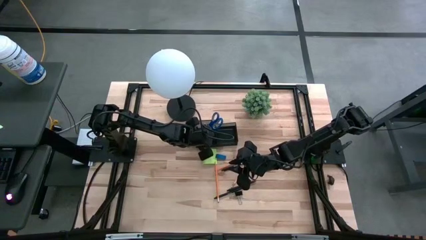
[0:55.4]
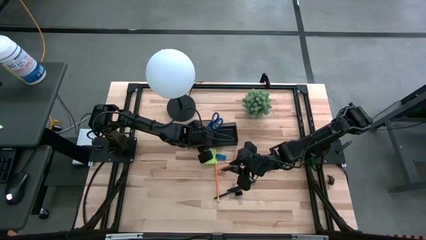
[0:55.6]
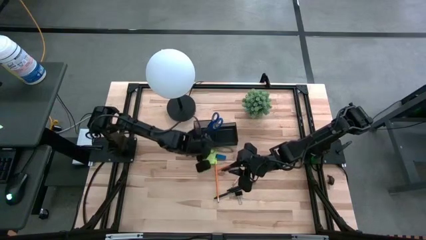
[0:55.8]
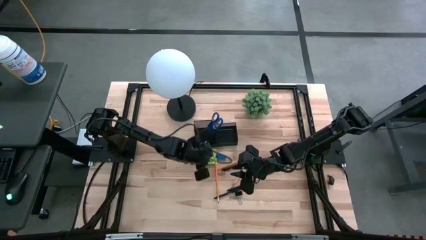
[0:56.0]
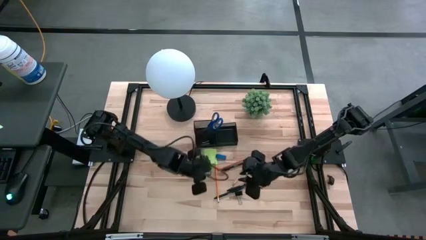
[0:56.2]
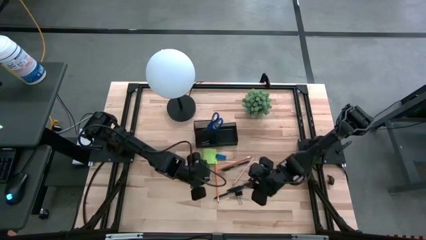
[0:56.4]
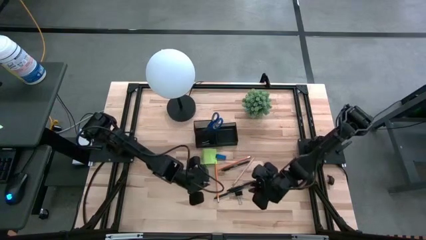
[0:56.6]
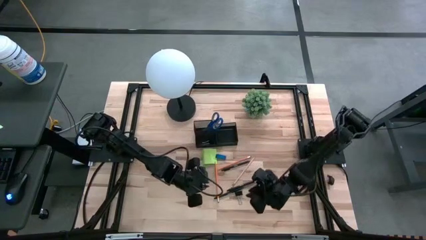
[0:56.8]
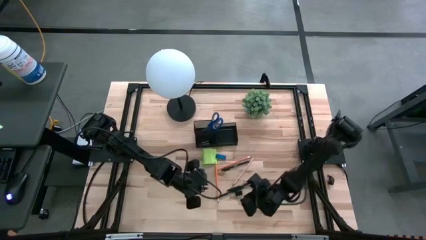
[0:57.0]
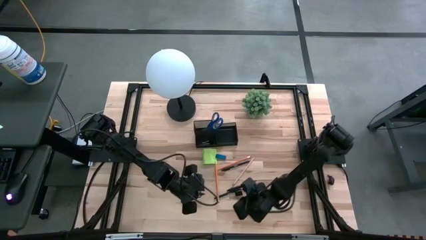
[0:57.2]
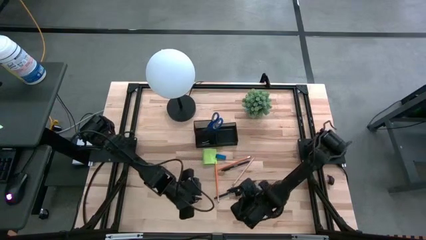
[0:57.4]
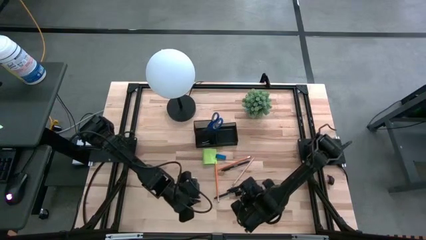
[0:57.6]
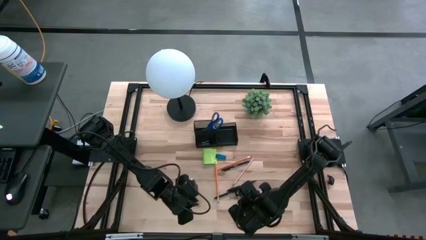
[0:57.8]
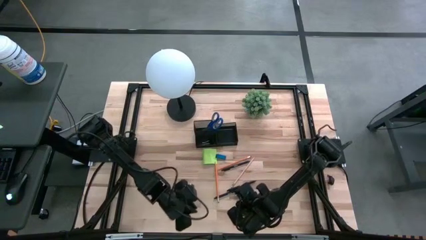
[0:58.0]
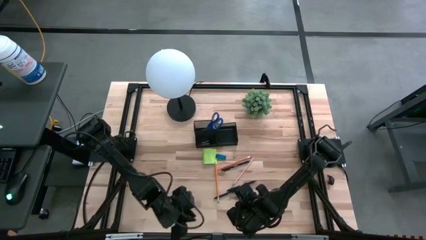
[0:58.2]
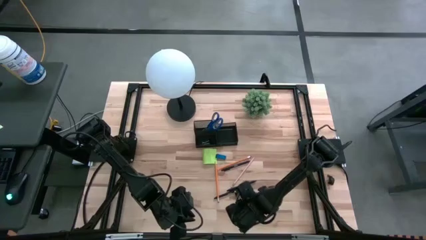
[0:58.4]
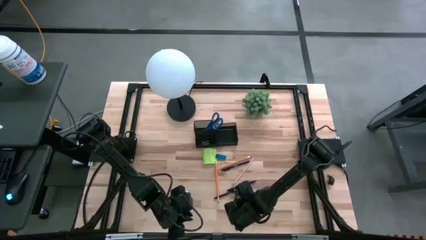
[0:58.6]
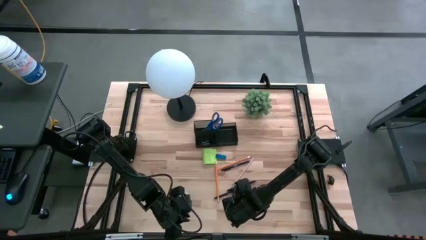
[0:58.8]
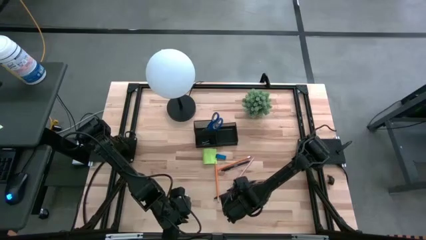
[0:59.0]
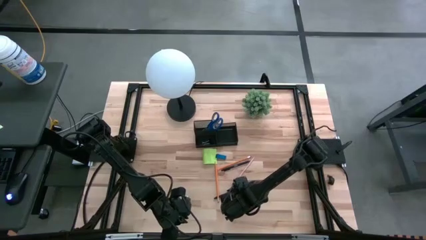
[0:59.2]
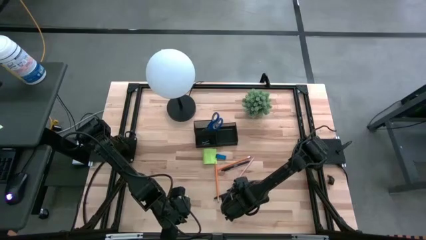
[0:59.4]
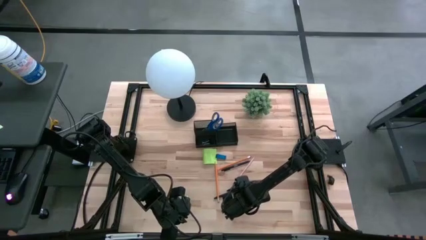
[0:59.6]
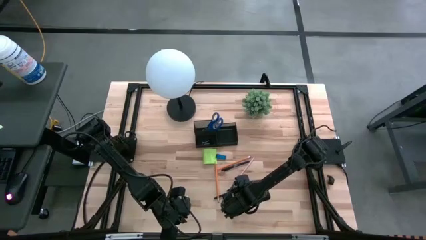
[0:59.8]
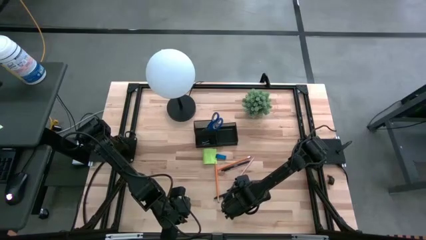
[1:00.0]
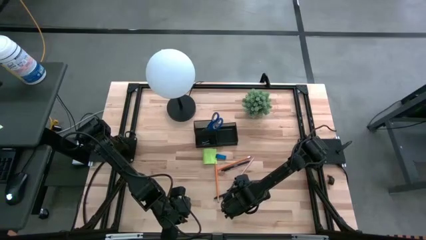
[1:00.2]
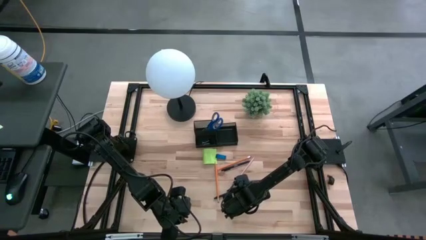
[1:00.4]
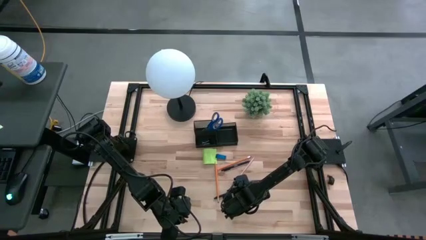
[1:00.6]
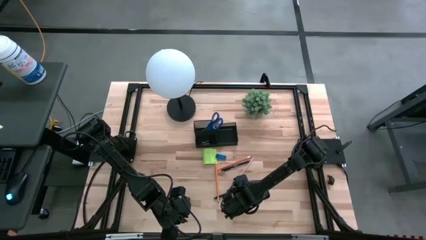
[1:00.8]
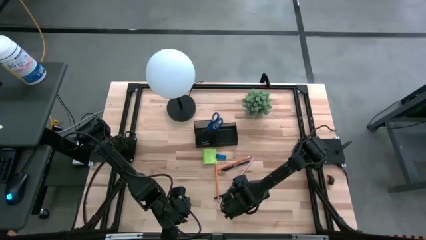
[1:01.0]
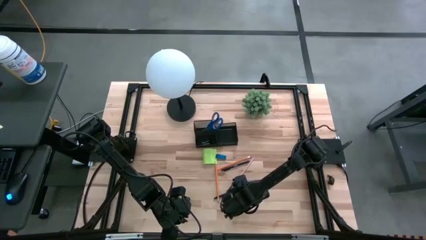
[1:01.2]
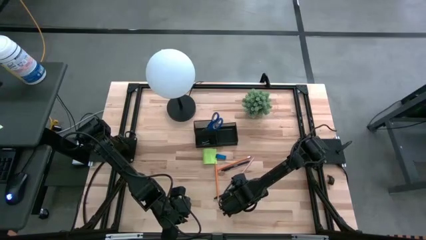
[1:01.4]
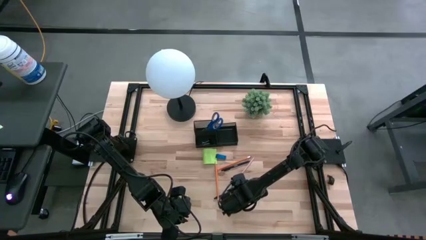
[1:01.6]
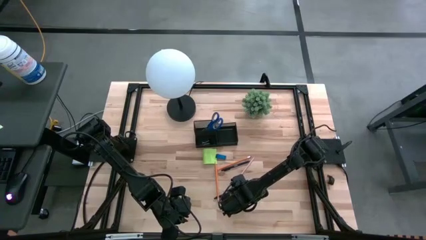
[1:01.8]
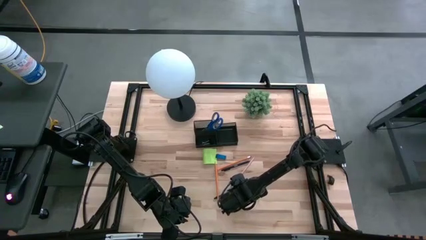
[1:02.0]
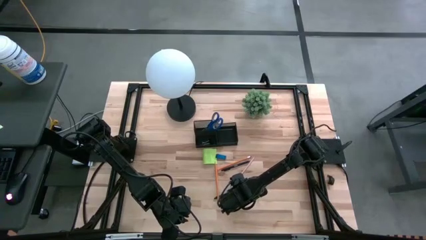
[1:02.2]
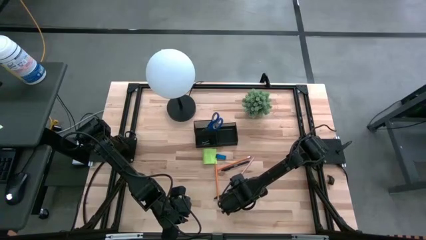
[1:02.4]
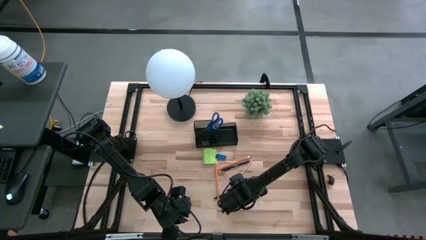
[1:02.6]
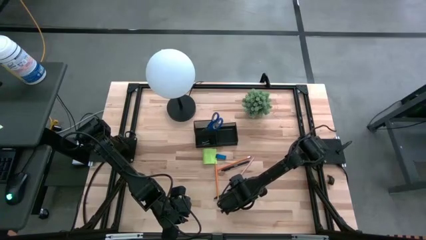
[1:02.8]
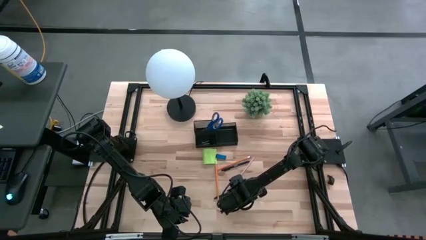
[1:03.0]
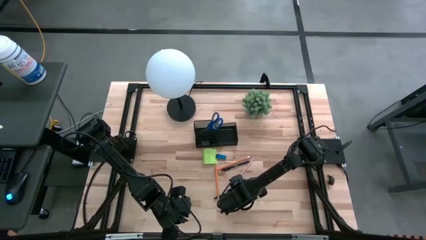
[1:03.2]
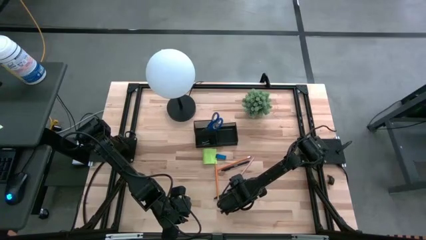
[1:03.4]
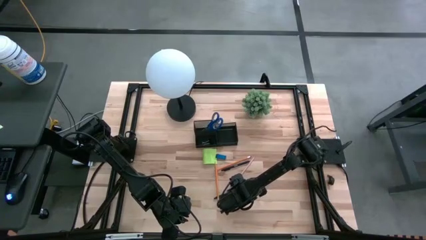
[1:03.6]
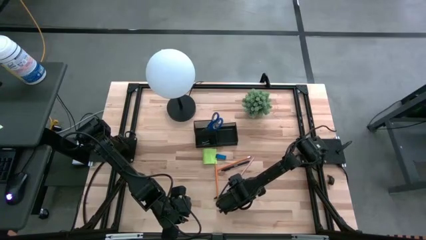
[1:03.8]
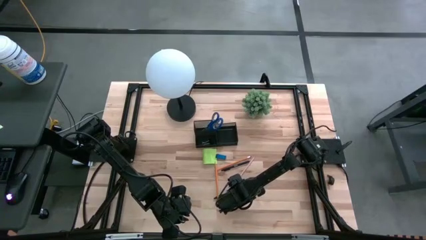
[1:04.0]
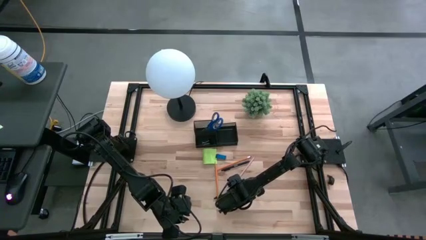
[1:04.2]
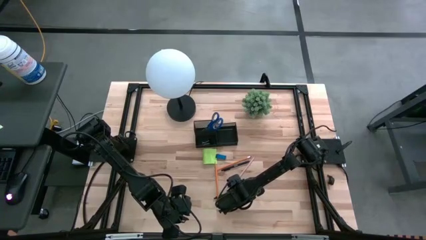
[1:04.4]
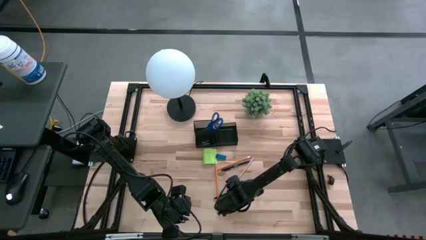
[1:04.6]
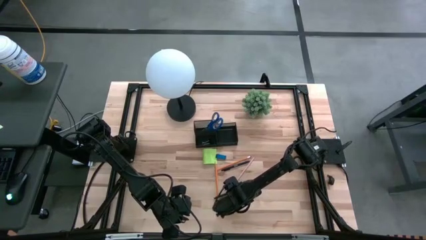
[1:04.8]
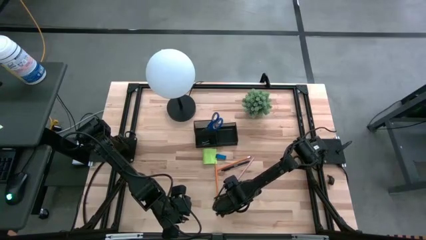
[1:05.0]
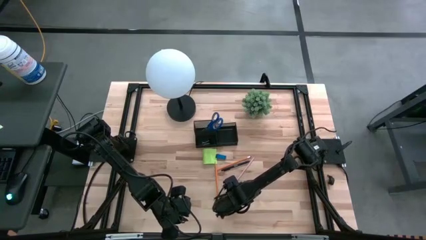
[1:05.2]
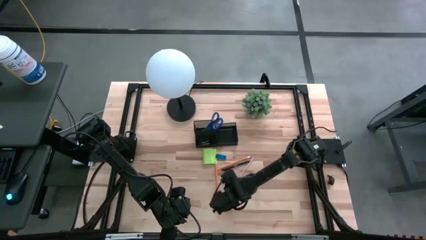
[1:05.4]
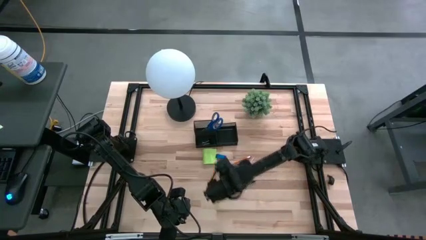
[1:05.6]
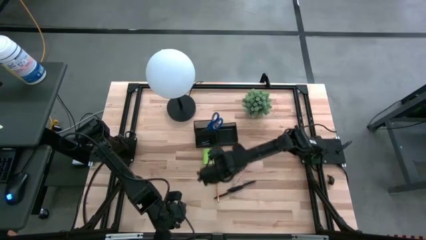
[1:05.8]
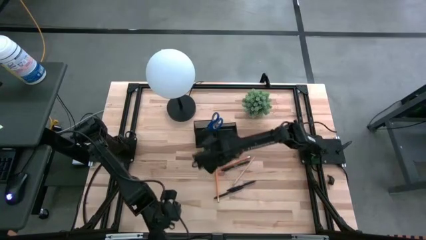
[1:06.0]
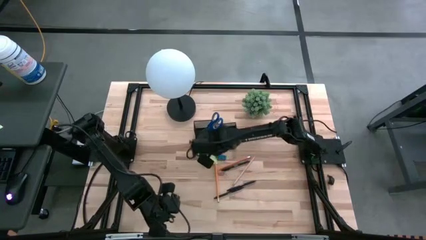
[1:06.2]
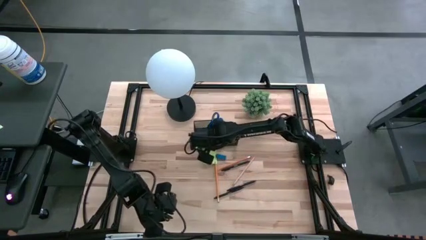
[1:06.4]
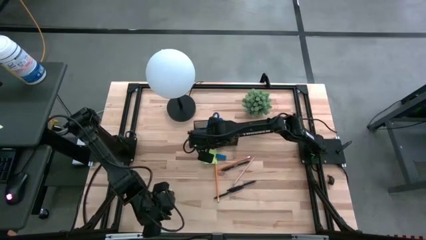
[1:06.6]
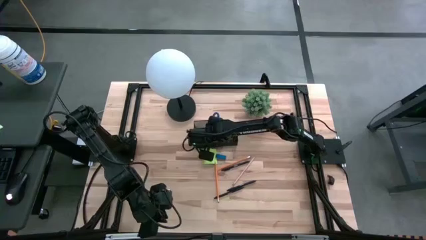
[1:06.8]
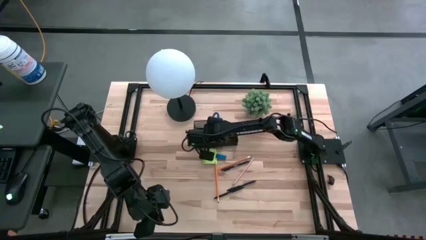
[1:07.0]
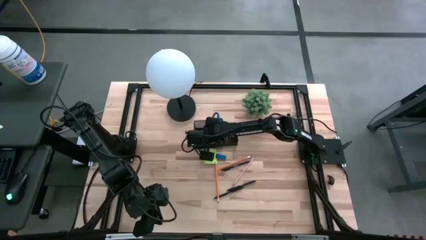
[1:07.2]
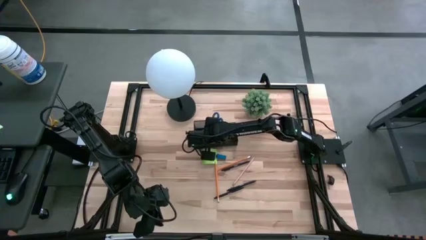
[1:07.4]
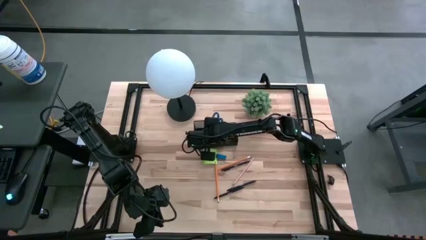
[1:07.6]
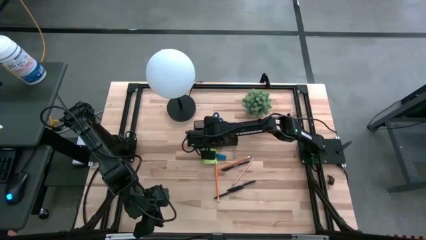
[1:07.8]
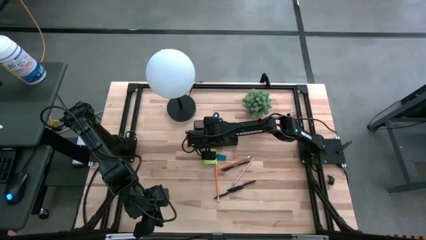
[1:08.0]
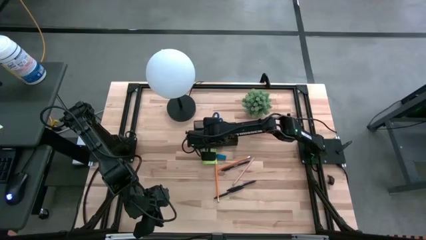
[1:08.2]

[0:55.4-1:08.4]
Task: Pick and place office supplies into organizer
Put the black binder clip into the bottom left side of the desk organizer
